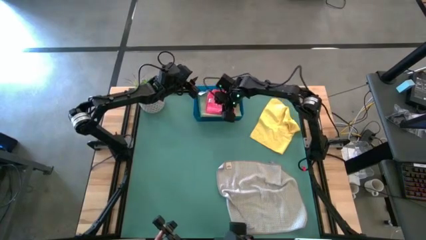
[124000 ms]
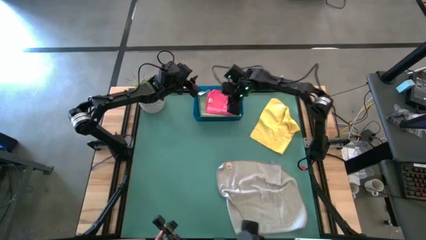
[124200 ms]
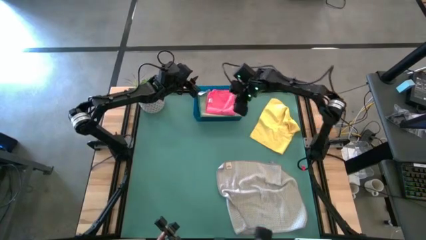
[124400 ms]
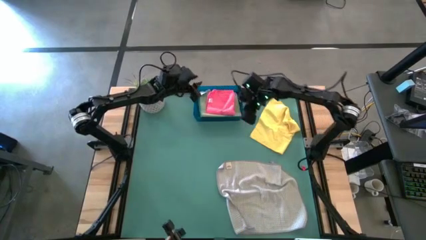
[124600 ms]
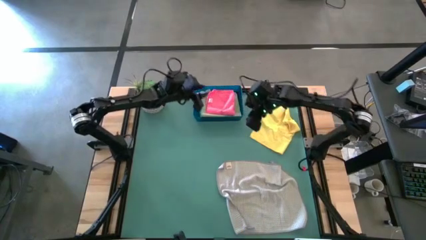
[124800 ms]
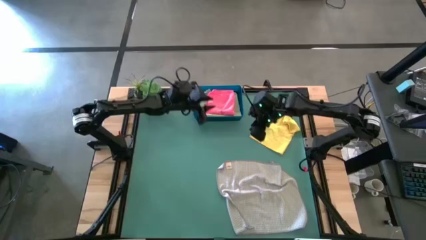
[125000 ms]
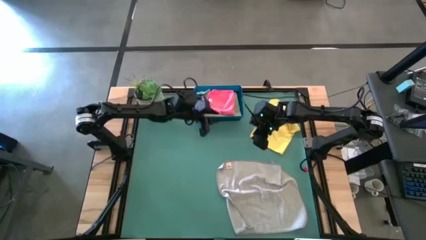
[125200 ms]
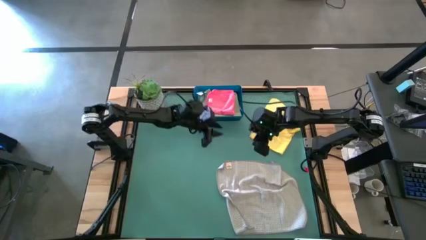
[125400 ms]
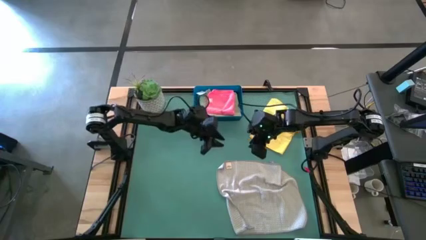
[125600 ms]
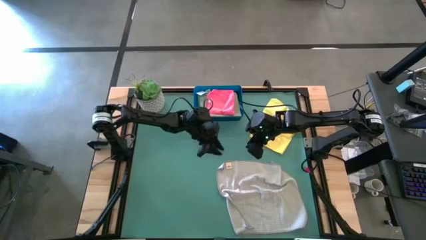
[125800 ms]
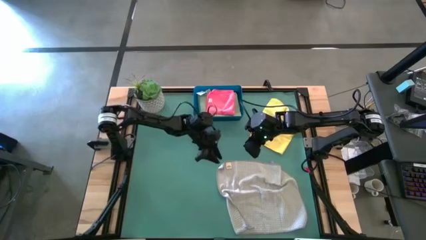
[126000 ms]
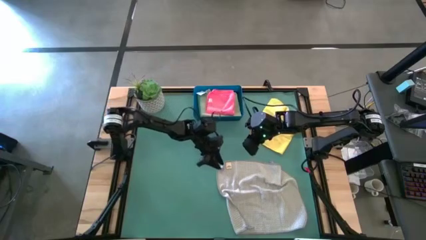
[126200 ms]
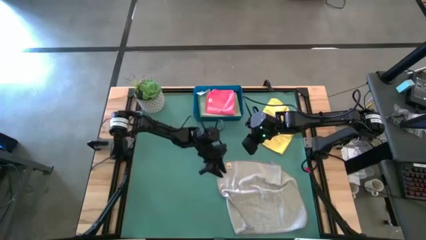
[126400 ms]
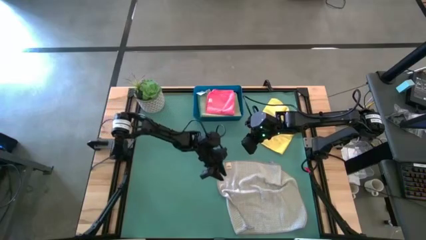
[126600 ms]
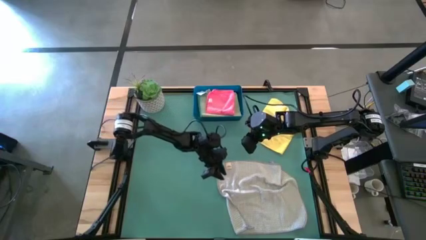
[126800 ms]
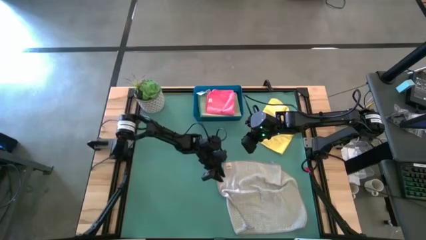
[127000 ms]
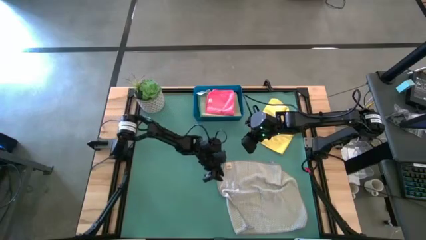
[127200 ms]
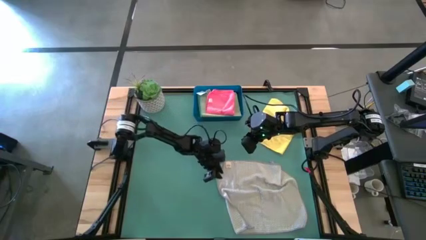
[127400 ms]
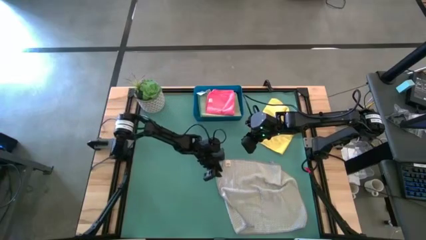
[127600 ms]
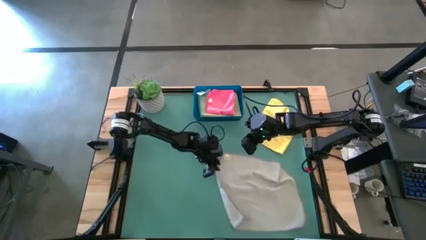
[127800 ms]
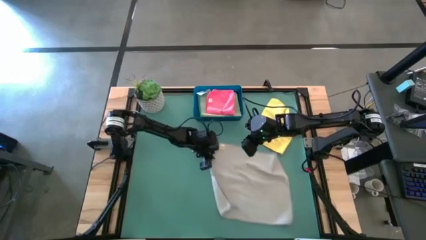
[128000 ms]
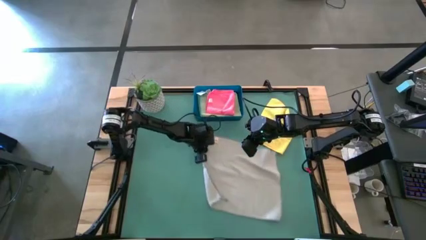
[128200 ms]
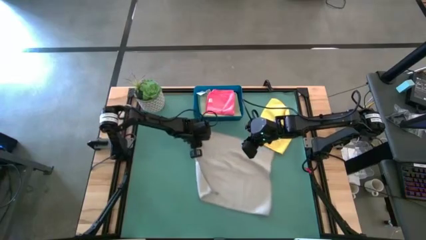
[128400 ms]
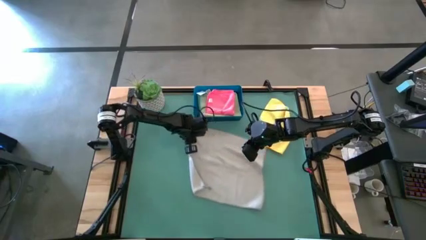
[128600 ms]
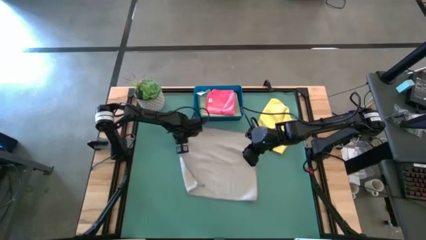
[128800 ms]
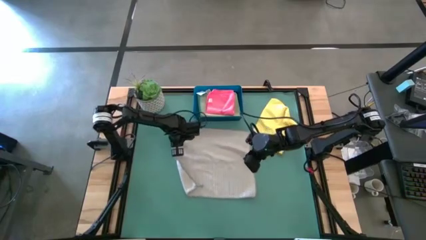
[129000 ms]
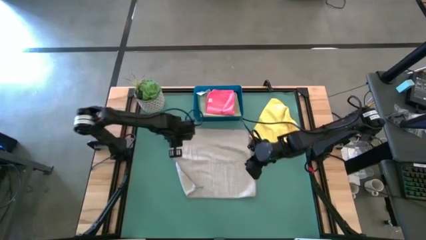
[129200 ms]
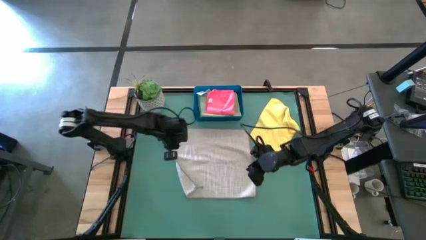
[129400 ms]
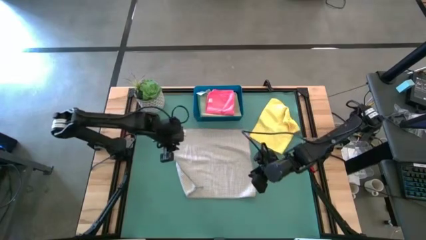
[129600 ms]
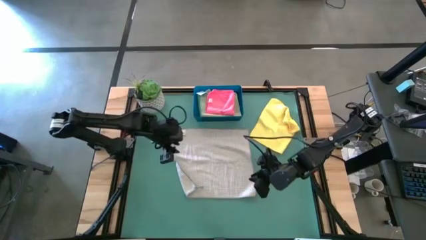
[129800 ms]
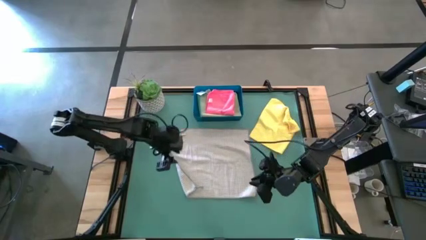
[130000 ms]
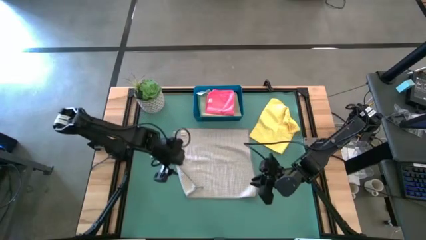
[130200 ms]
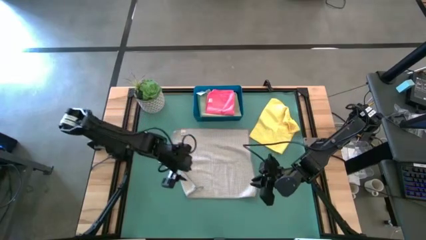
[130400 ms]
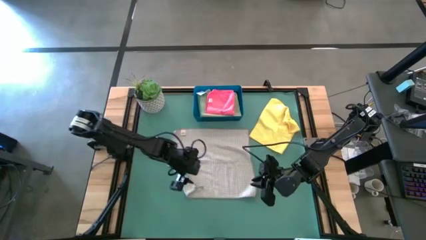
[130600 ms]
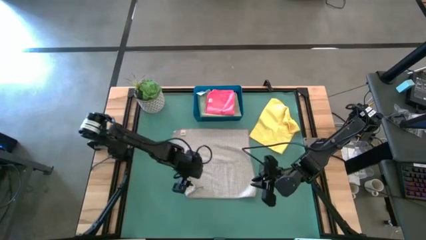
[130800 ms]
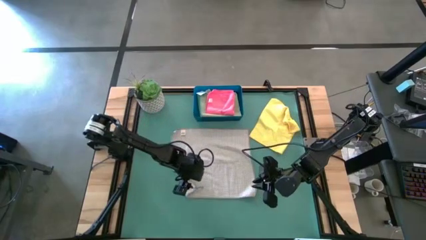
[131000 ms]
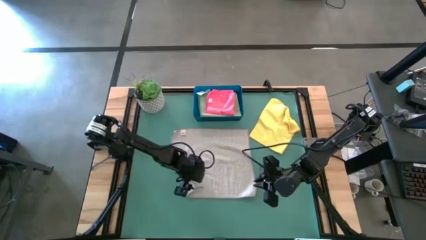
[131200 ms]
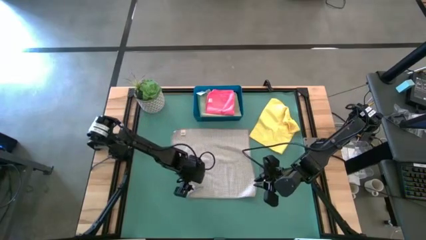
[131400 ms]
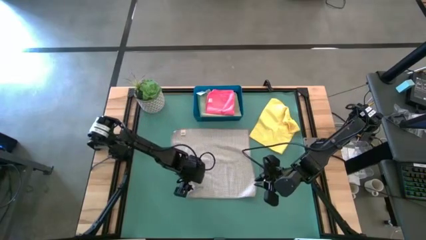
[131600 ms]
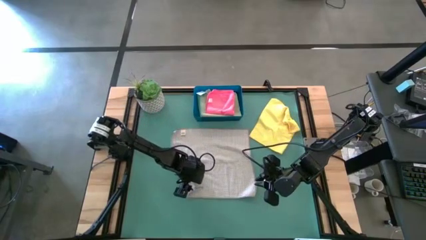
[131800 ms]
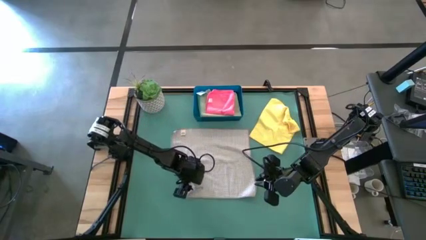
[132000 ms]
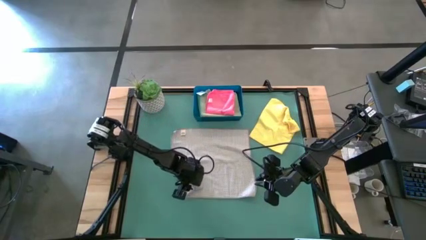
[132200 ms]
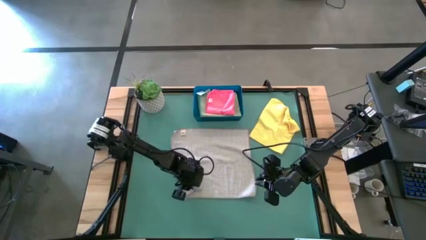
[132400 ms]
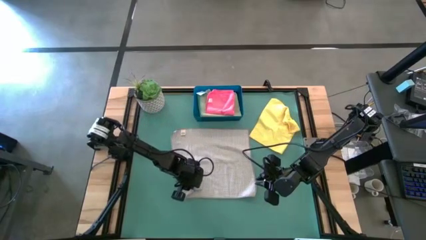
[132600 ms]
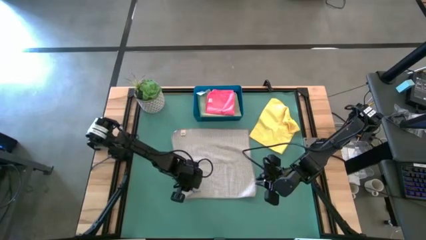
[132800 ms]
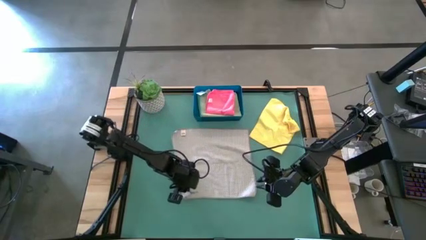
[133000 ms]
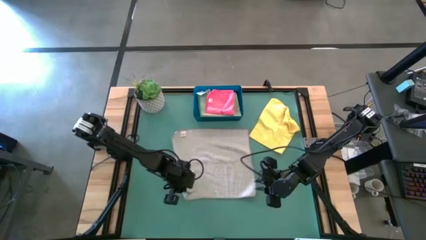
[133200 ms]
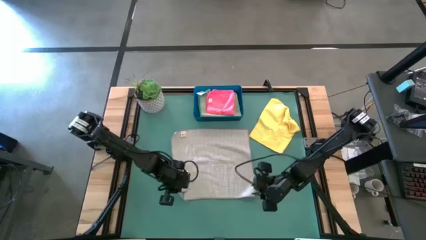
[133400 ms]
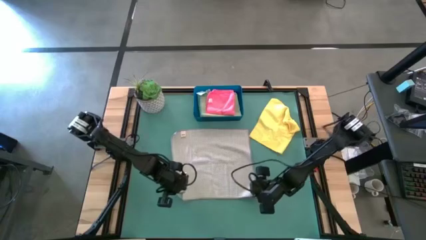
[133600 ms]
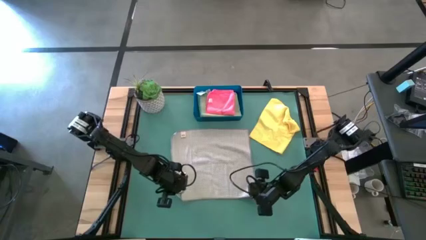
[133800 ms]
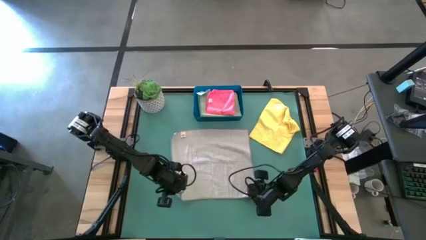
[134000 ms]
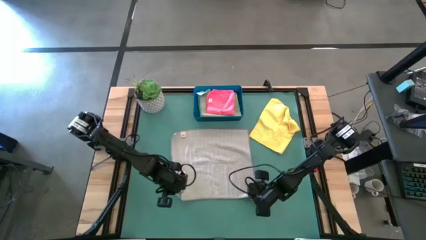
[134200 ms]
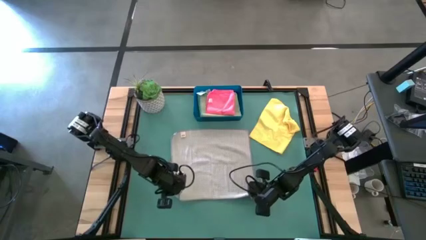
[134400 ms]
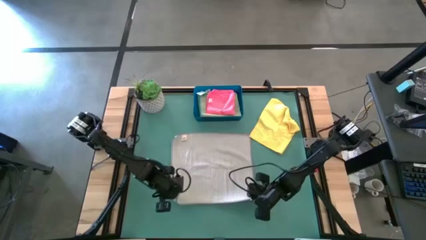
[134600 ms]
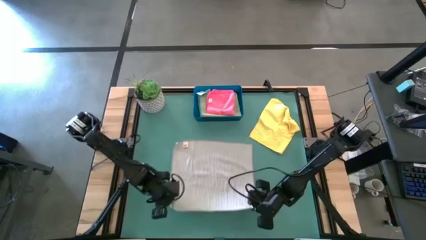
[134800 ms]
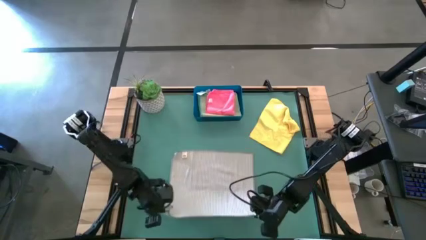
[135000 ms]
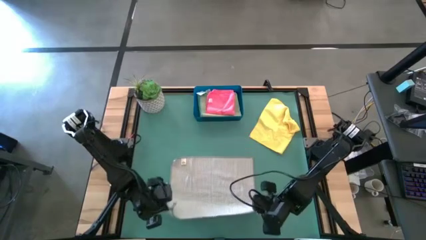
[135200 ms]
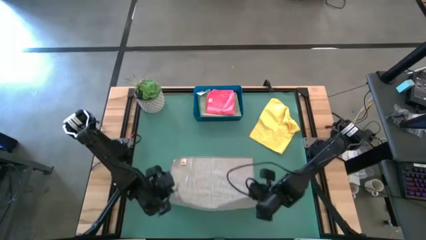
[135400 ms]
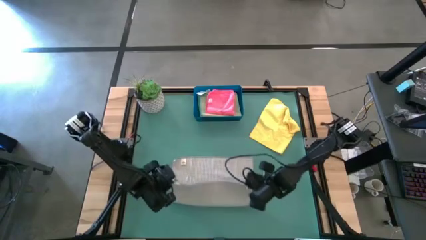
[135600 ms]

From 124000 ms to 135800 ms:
Task: Fold microfiber towels
Fold the gray microfiber towel

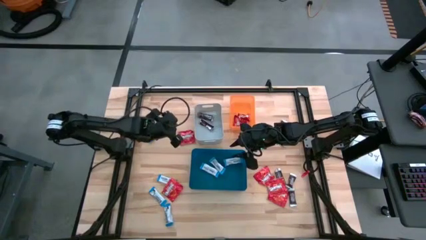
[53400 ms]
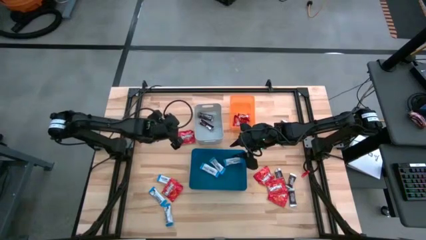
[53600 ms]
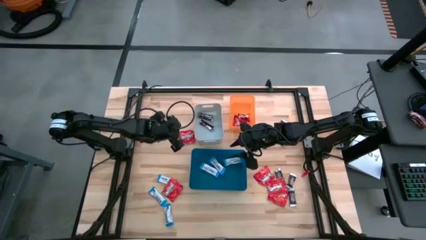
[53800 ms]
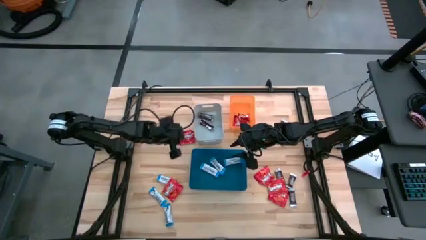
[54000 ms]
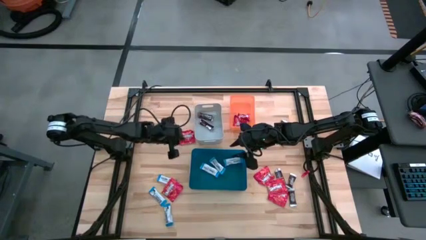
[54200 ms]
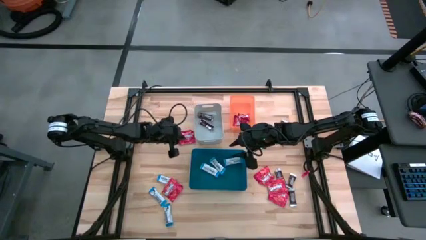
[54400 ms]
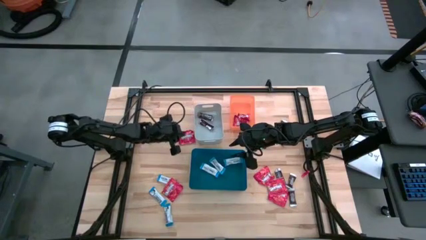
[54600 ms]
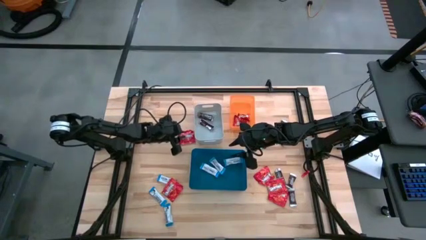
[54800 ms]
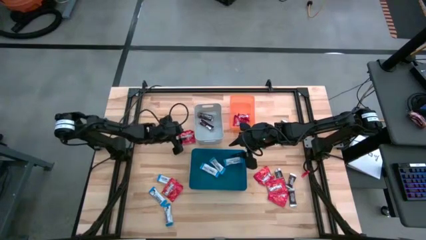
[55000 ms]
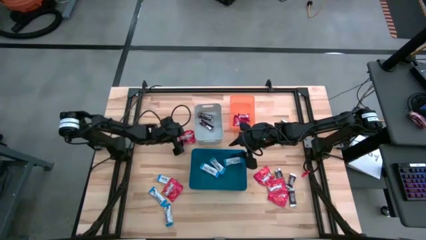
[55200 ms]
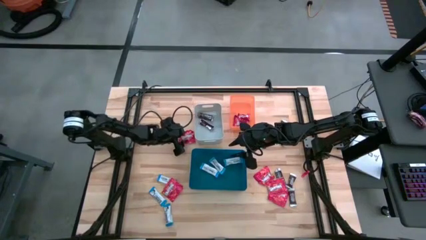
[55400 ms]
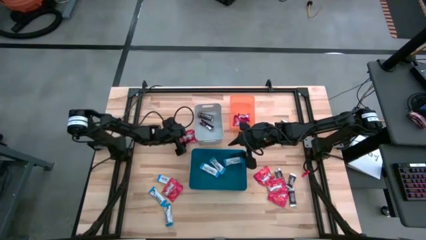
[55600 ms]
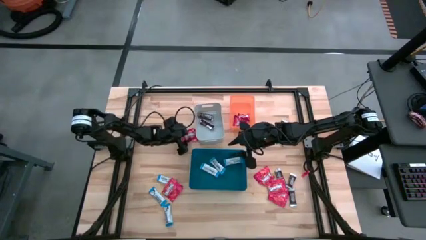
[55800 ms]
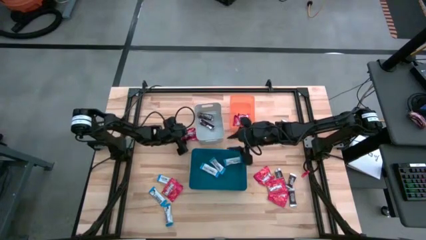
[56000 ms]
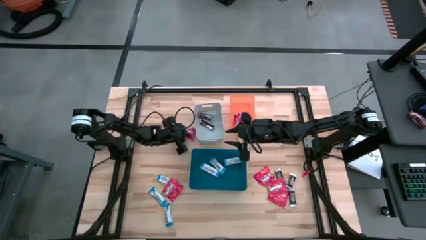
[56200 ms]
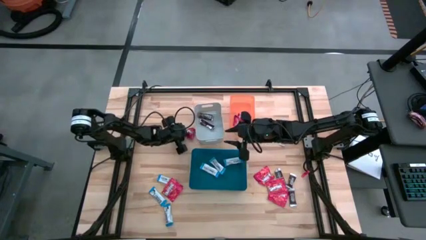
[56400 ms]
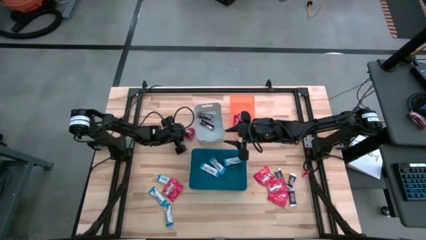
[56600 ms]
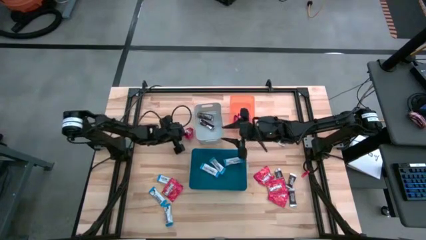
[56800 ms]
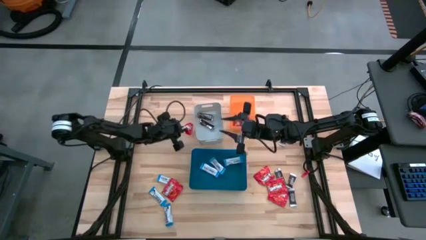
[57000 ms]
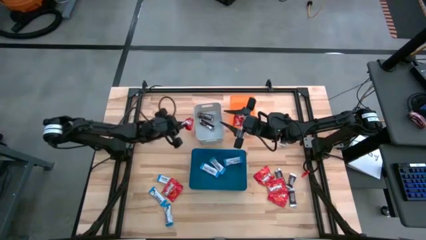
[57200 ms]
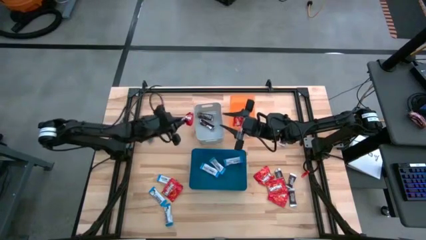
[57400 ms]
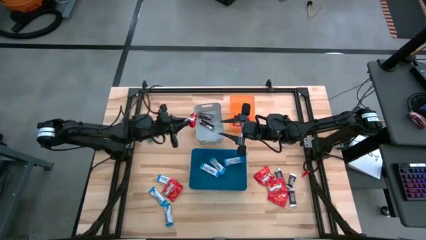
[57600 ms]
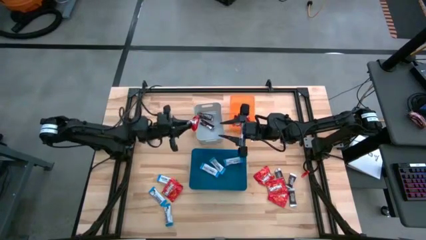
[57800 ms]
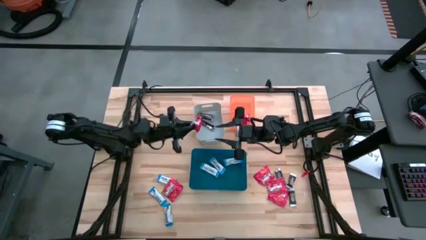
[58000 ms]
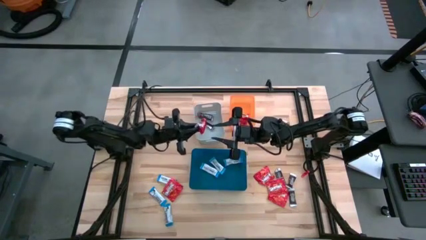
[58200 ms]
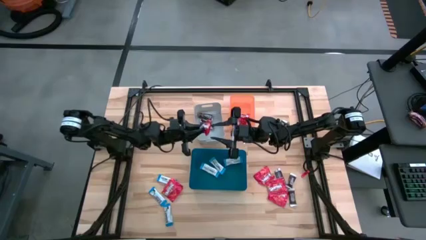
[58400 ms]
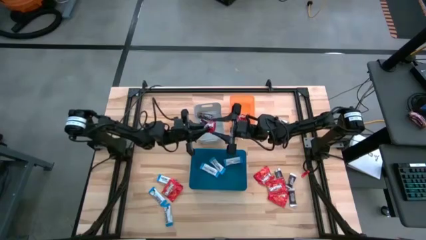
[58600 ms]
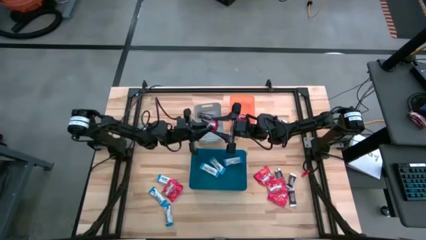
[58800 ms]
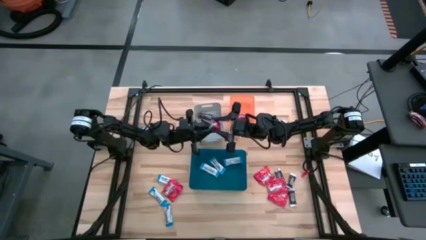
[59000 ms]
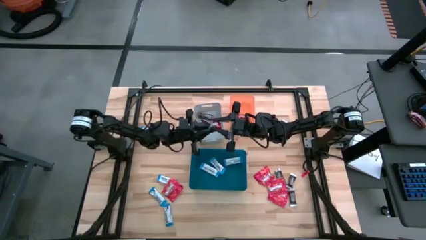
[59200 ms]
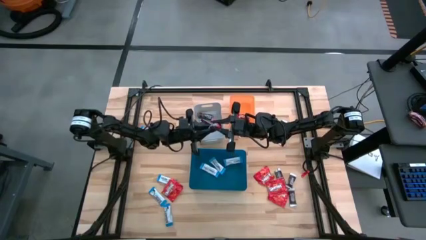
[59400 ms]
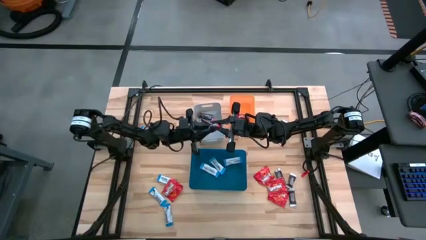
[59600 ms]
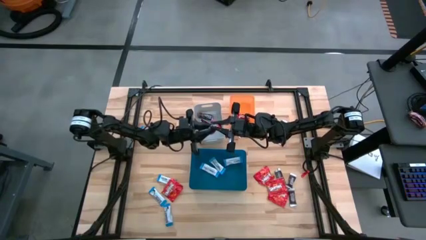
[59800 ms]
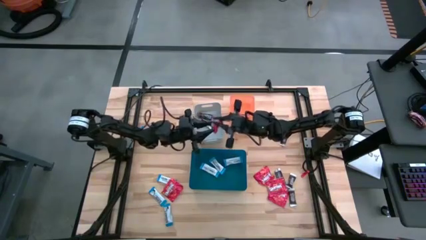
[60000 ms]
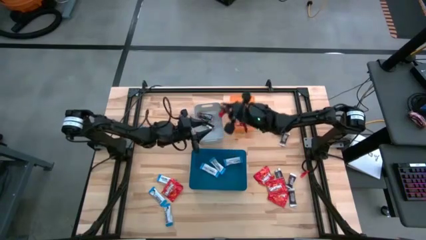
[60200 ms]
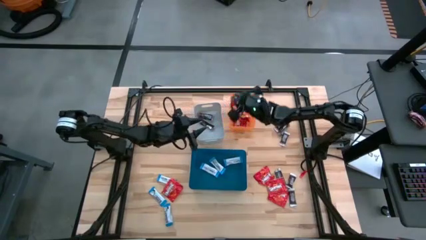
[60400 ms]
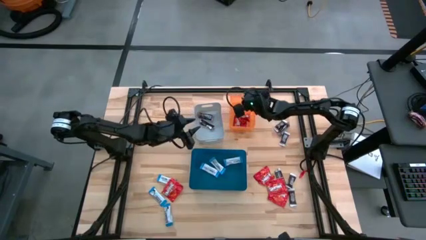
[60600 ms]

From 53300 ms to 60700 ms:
Task: Sort candy
Put the red chocolate into the orange bin
